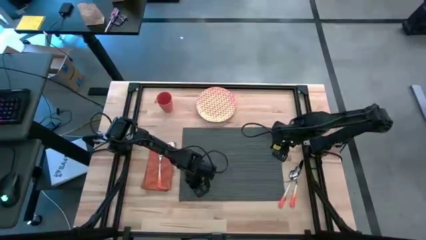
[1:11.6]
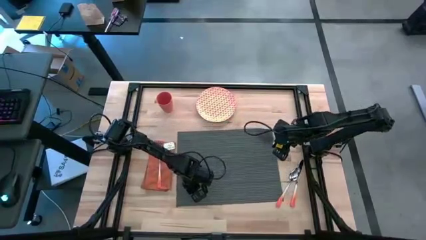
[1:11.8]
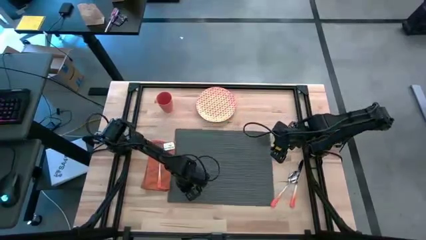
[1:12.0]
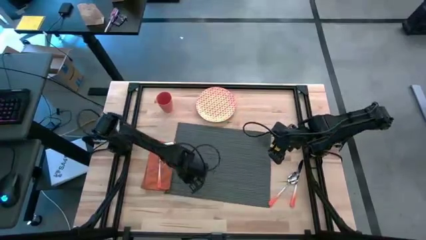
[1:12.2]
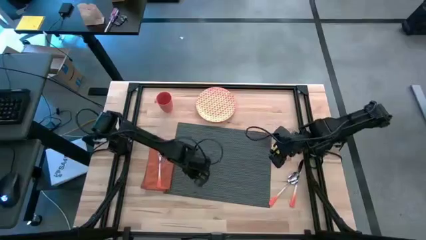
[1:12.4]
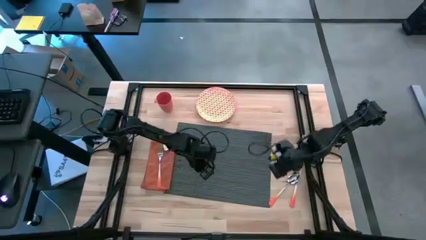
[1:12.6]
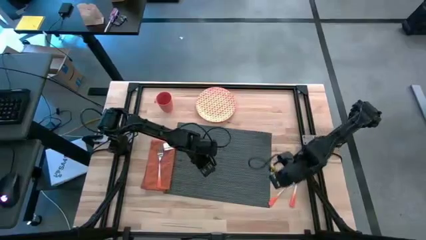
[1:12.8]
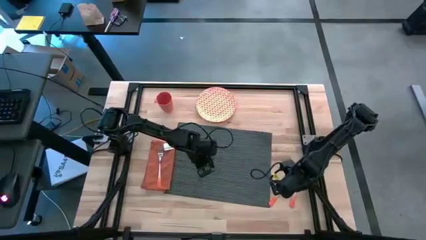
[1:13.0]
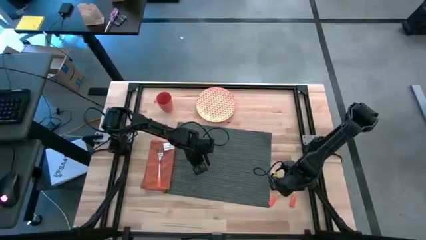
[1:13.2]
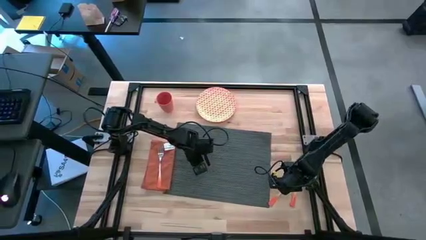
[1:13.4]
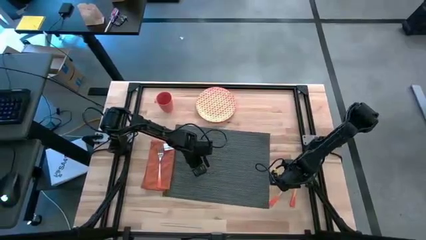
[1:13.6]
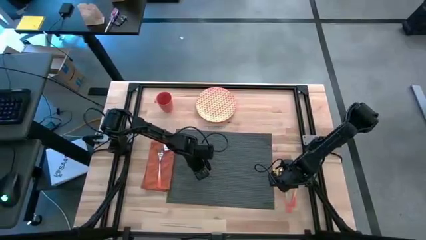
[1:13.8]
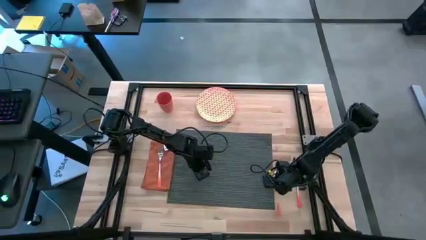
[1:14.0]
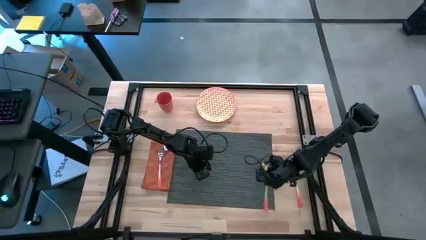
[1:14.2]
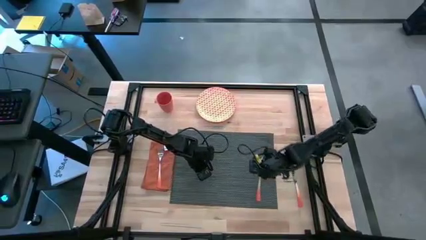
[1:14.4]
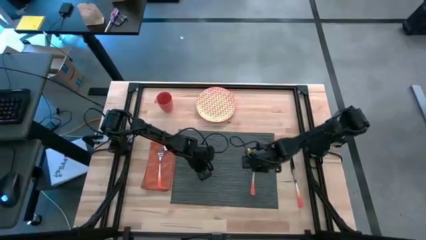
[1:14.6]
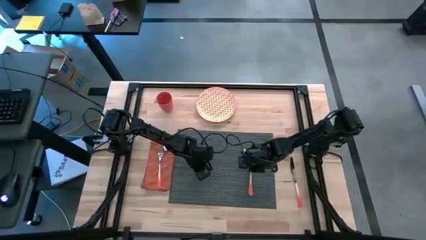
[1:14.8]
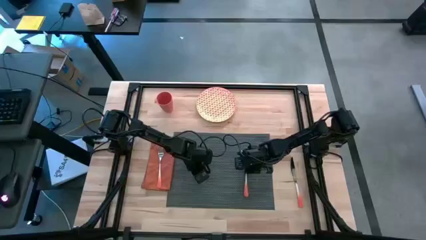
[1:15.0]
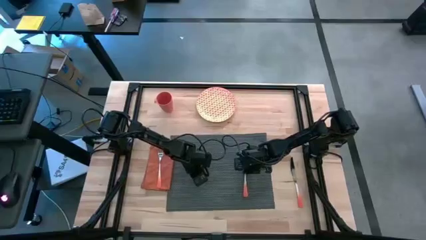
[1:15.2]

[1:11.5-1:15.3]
Task: Set table place
Put the orange spoon on the table gray placemat

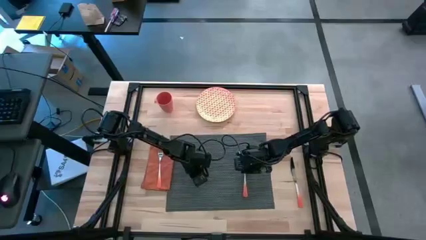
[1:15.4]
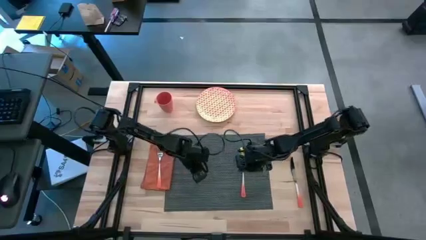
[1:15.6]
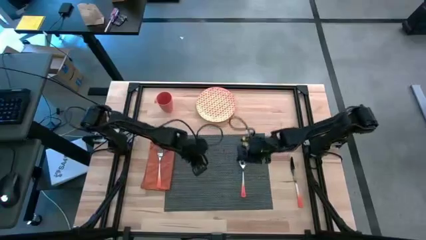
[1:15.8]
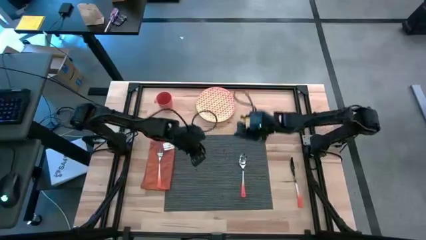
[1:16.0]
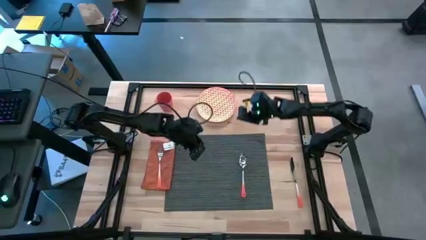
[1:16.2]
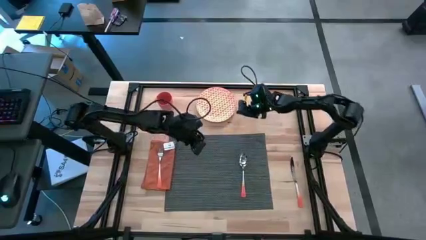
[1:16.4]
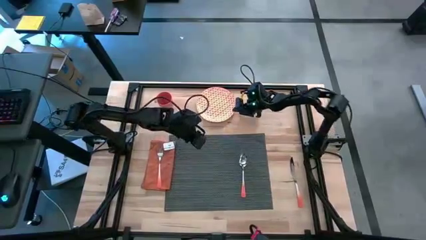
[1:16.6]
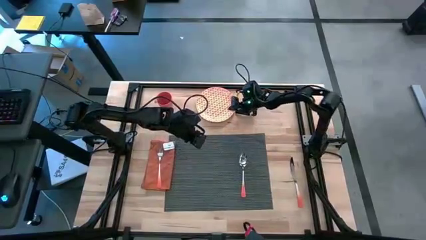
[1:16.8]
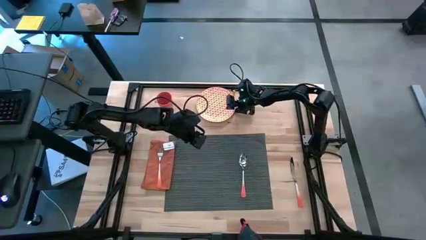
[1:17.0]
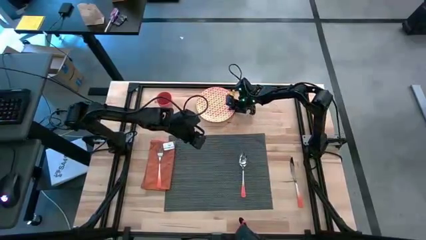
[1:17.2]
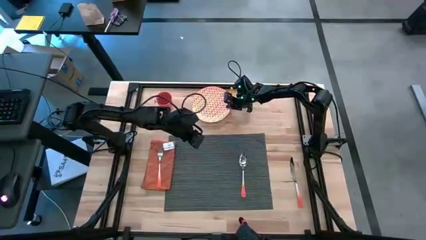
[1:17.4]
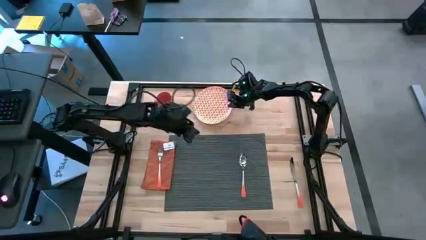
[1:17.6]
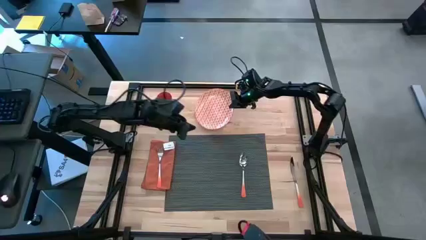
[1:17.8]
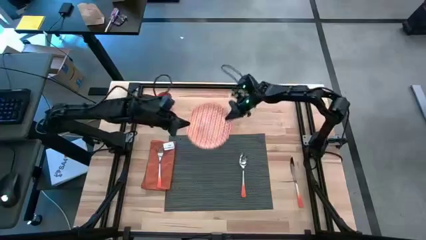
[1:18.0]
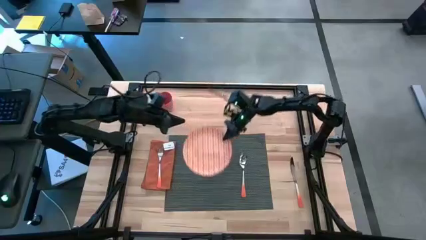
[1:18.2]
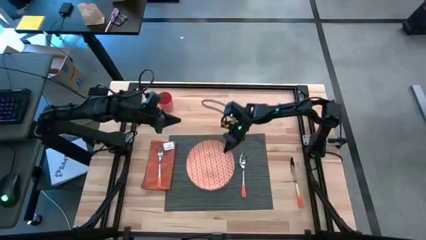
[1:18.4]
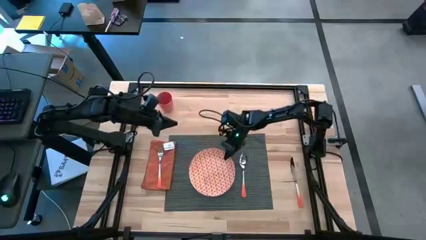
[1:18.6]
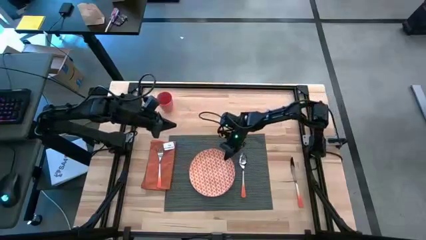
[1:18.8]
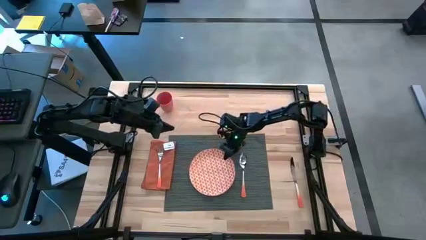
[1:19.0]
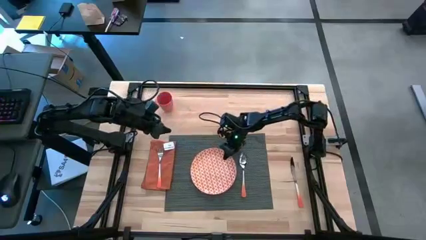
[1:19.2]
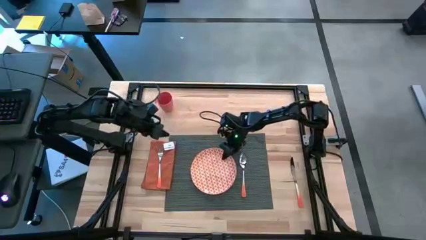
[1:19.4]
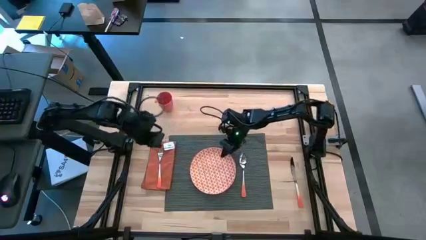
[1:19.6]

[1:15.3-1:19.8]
Put the pattern orange plate on the table gray placemat to the left of the orange spoon

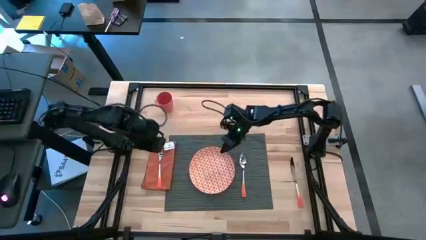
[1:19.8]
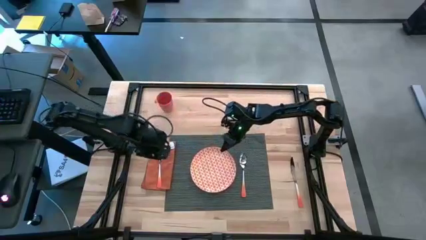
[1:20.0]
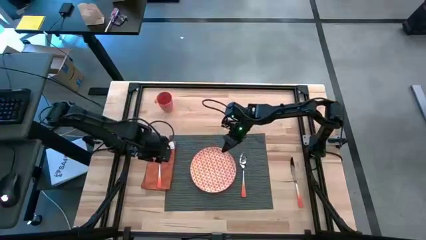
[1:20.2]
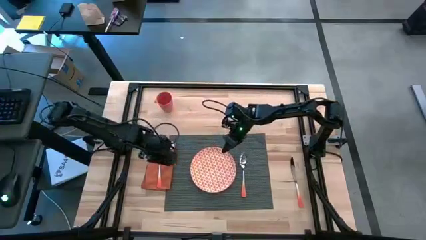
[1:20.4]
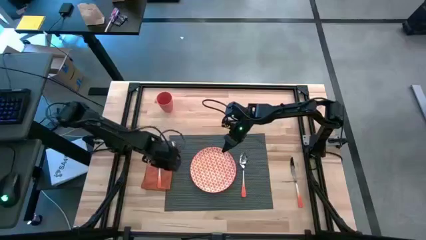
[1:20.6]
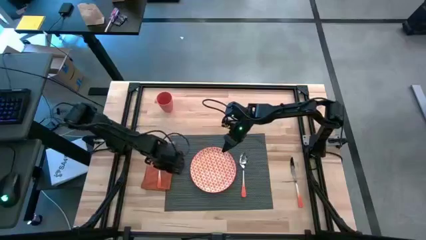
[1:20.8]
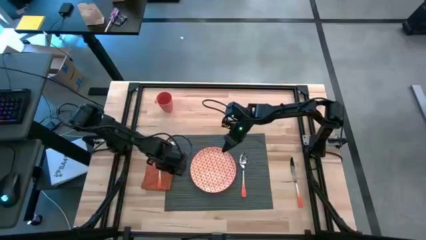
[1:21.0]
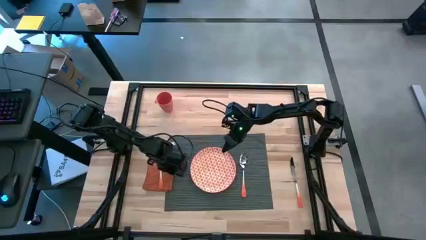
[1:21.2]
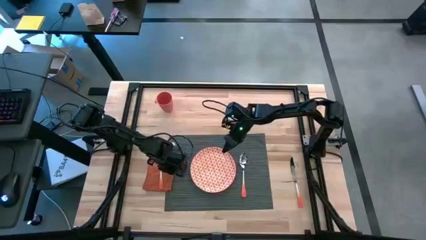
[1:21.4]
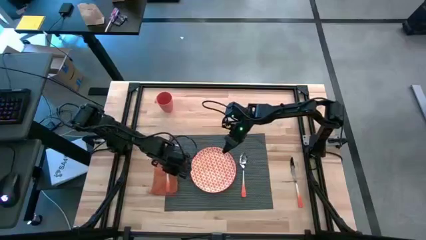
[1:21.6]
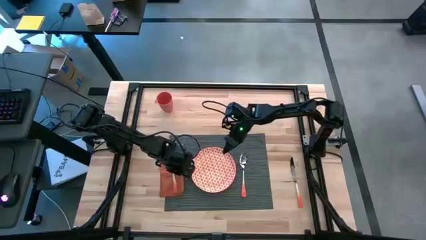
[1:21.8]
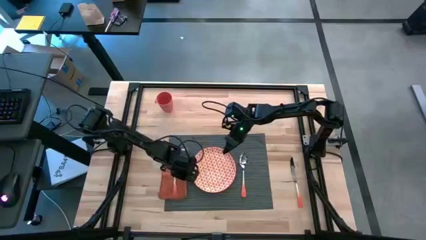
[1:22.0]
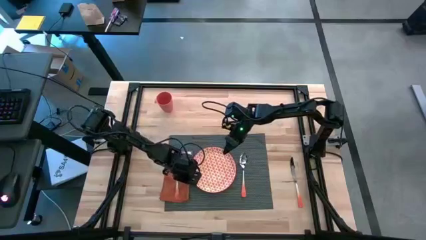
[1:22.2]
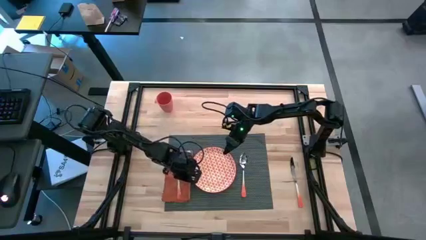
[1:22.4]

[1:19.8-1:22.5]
Adjust the orange table napkin

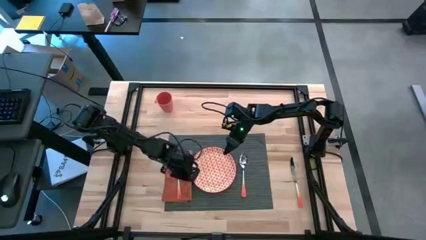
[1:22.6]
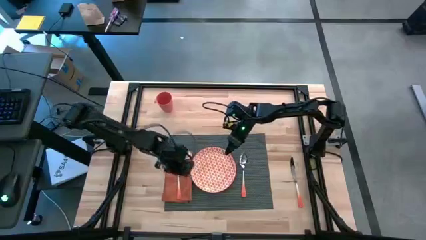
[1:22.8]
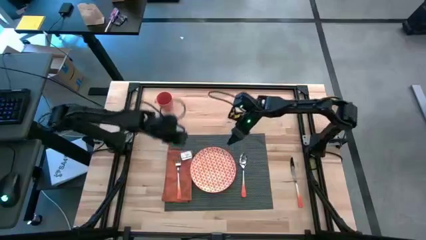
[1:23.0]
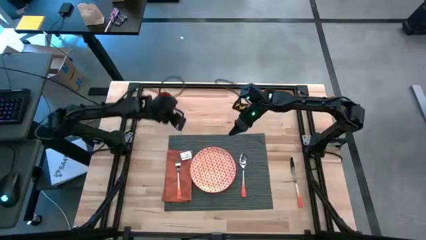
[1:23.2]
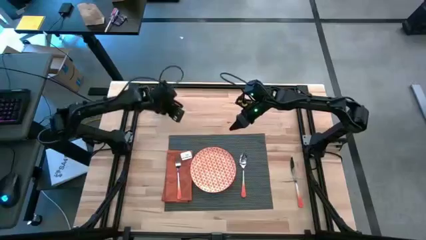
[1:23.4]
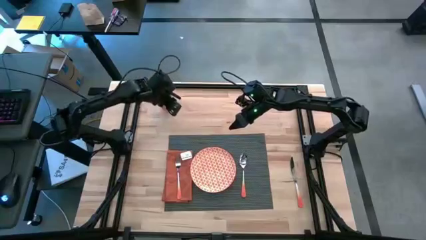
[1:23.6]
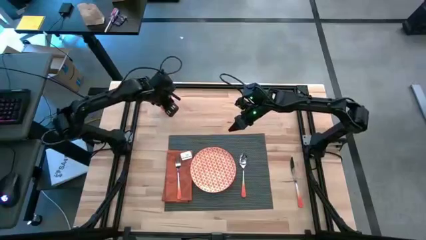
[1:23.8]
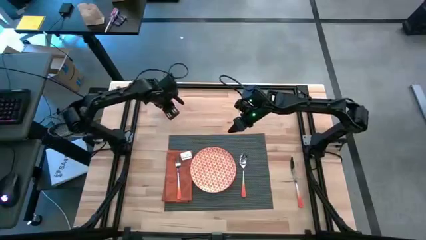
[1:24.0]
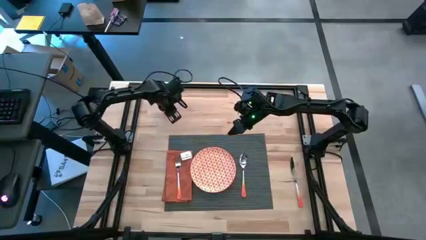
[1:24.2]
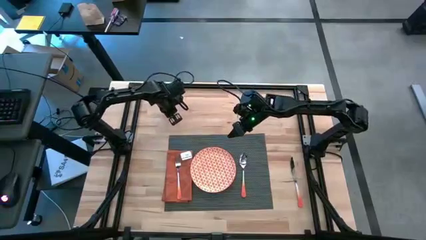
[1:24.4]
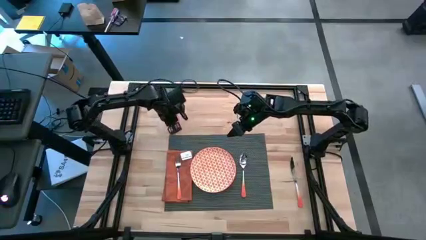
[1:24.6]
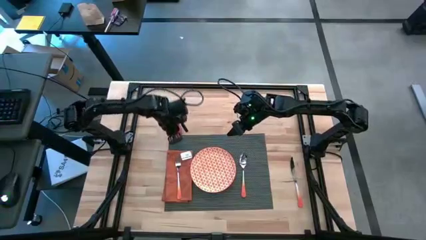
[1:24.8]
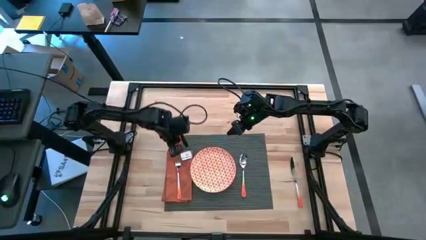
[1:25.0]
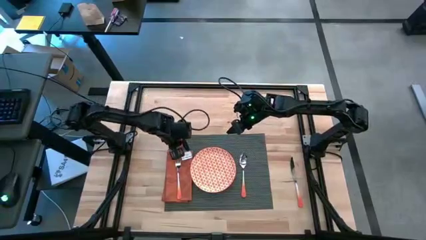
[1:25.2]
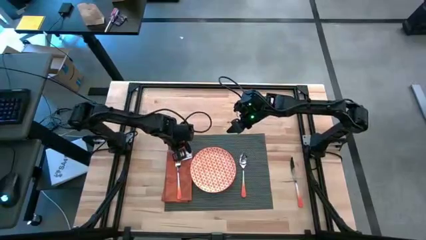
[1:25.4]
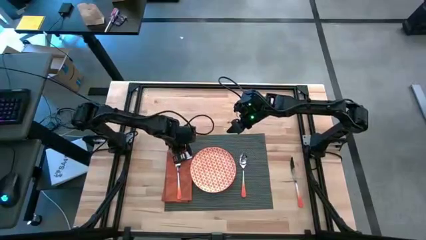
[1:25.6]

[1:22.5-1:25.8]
Put the orange cup on the table gray placemat to the top of the orange table napkin

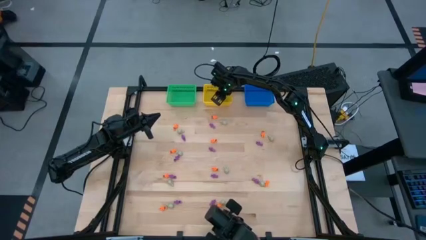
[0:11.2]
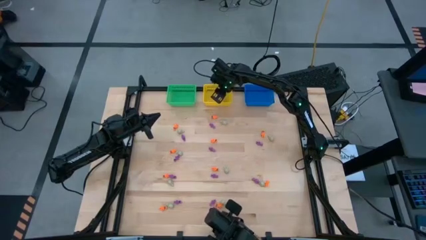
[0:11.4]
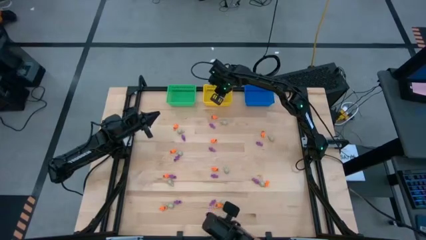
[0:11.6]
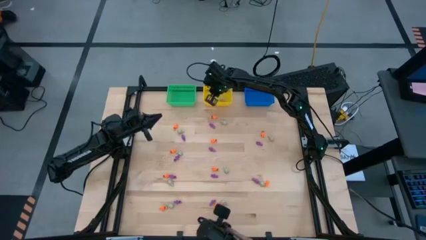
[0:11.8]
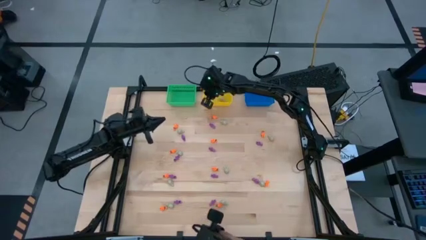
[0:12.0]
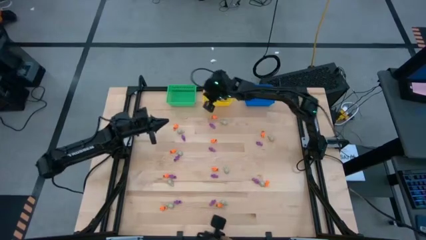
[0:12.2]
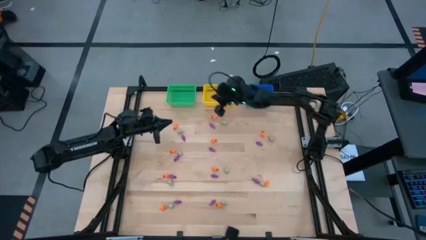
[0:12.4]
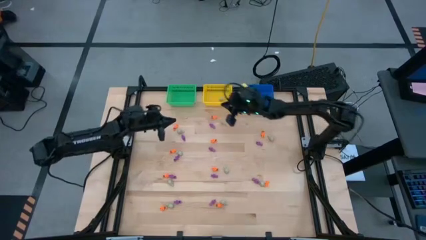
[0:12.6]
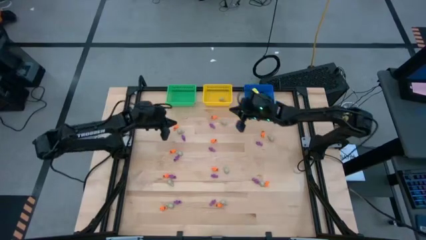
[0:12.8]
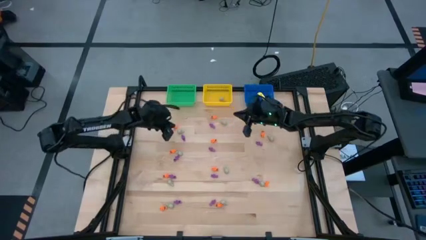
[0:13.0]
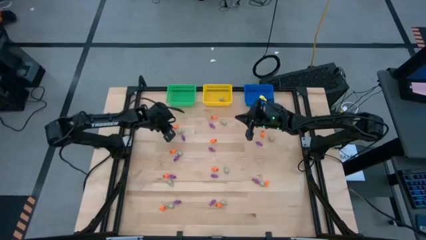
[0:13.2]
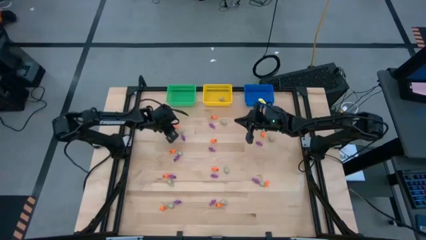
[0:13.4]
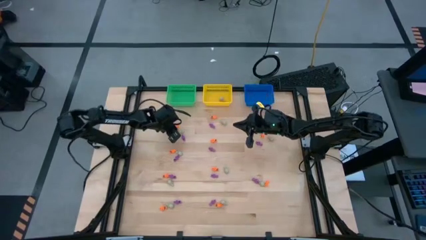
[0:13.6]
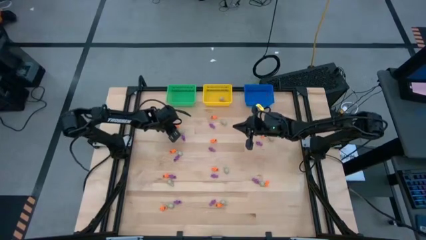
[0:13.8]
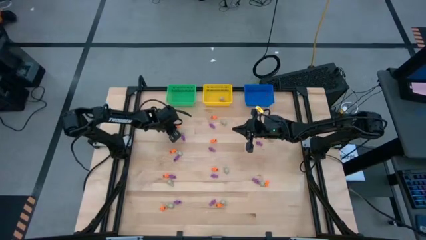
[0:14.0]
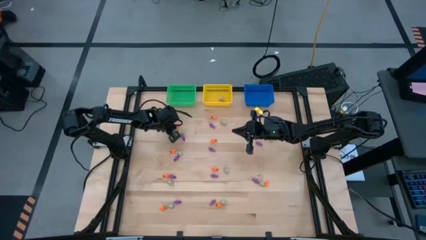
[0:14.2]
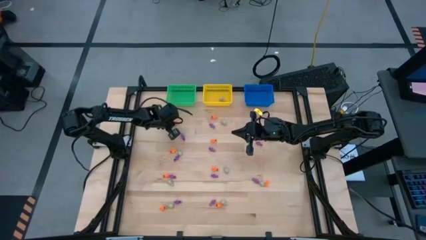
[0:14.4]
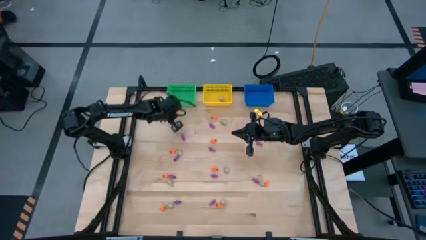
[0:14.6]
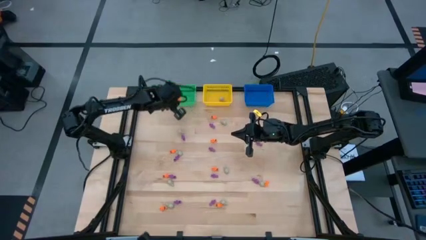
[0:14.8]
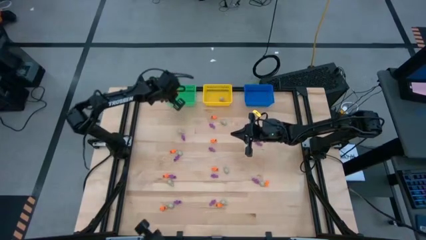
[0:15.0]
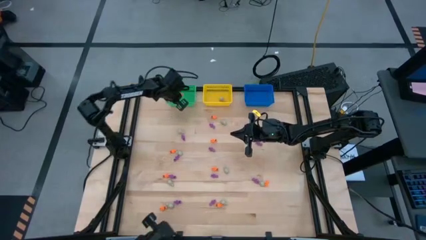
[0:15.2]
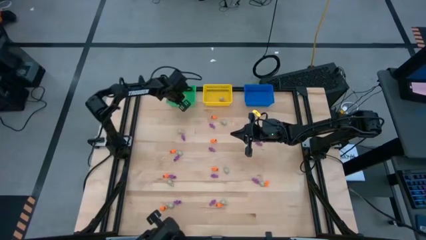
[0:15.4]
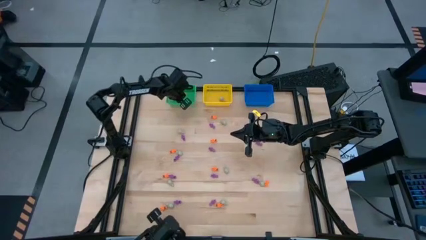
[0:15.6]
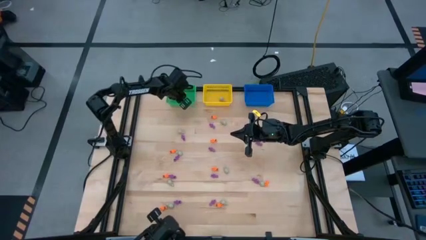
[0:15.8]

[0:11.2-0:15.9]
Task: Sort Halloween decoration
Put the orange skeleton toy into the green bin
